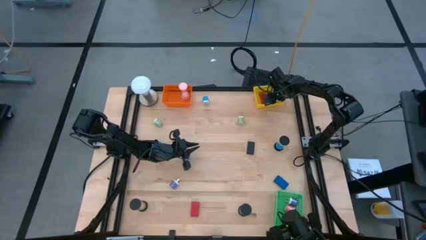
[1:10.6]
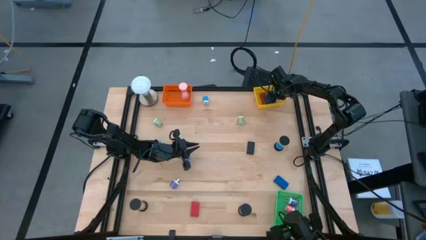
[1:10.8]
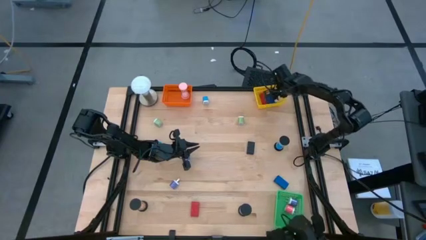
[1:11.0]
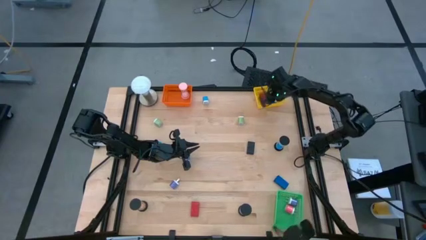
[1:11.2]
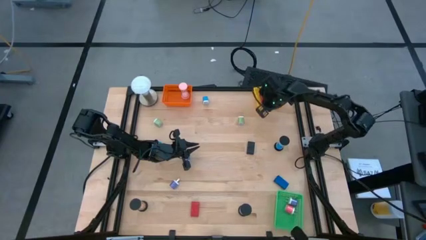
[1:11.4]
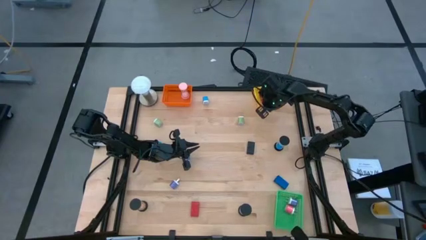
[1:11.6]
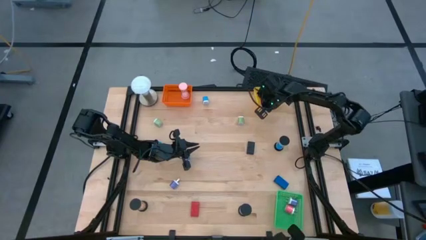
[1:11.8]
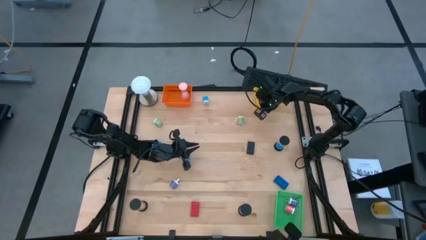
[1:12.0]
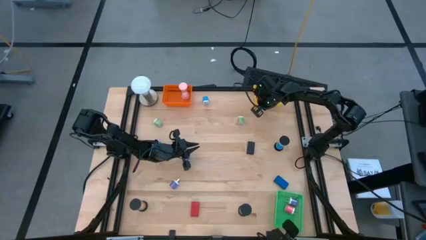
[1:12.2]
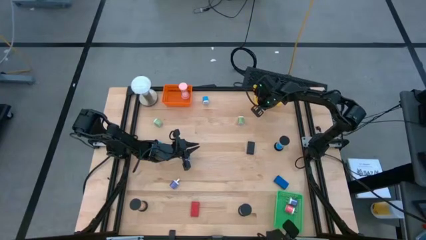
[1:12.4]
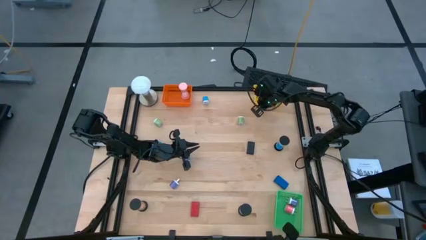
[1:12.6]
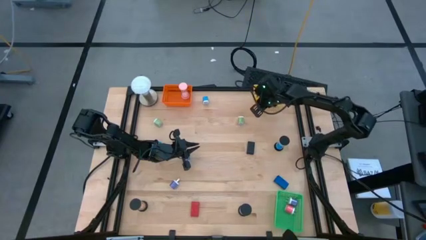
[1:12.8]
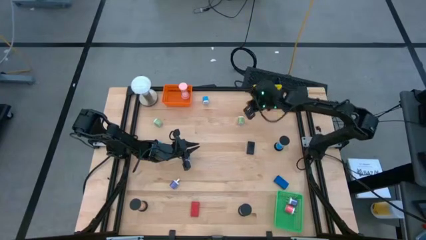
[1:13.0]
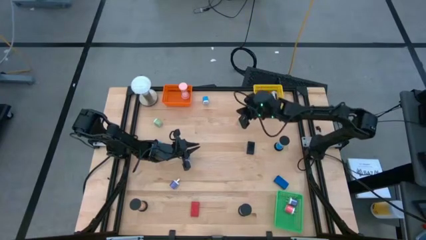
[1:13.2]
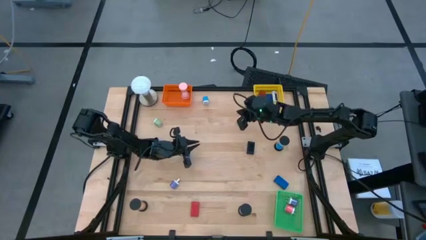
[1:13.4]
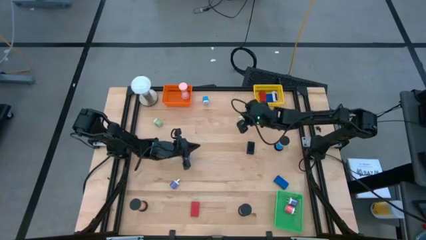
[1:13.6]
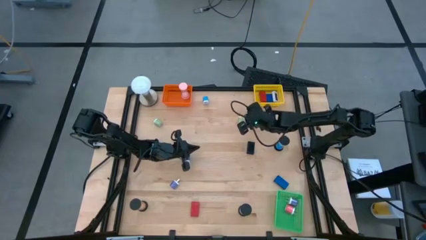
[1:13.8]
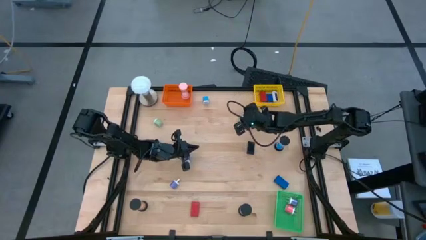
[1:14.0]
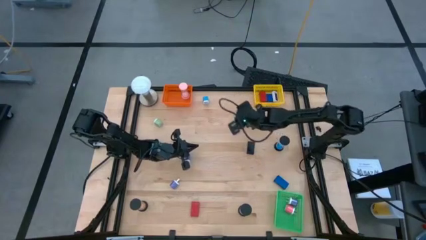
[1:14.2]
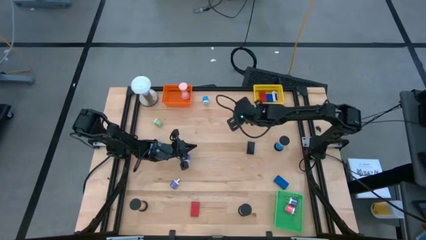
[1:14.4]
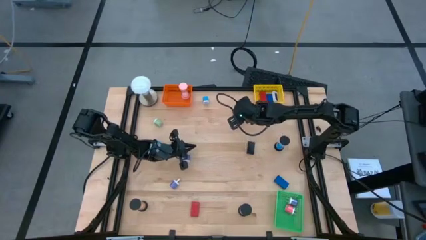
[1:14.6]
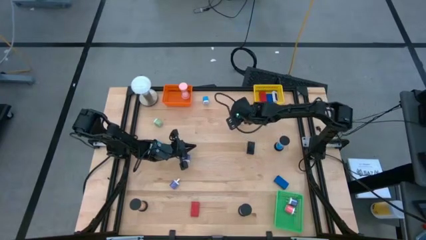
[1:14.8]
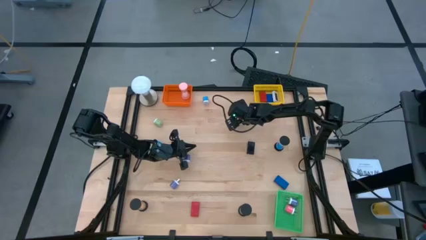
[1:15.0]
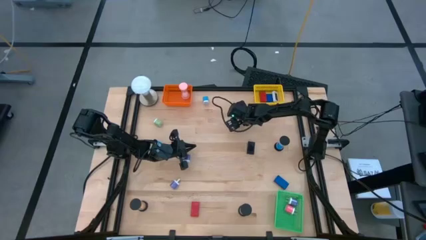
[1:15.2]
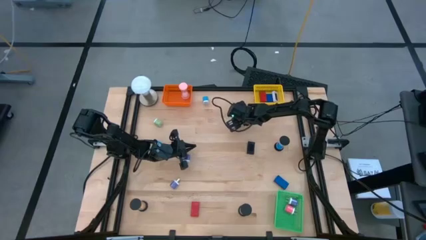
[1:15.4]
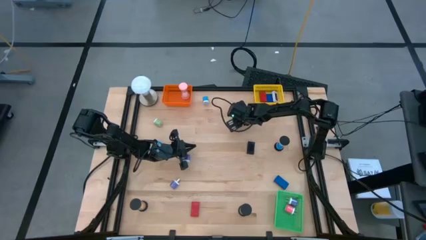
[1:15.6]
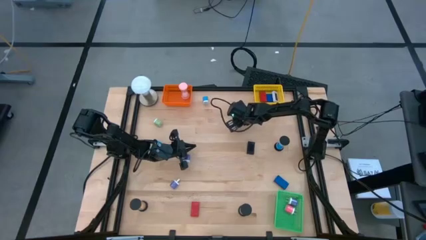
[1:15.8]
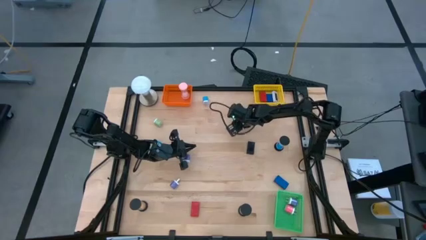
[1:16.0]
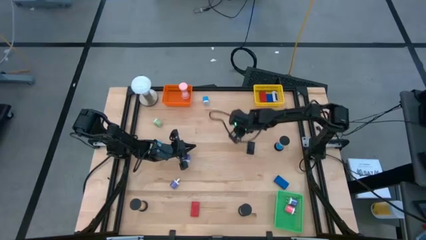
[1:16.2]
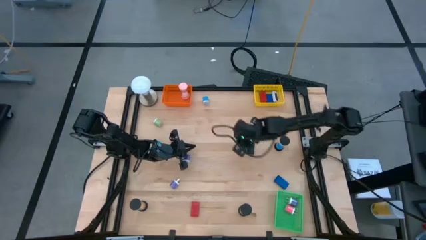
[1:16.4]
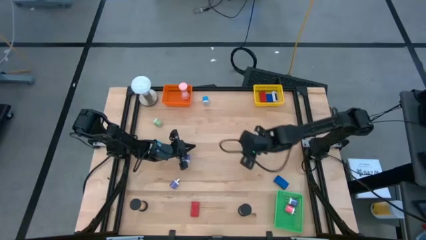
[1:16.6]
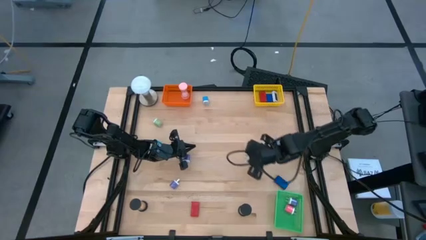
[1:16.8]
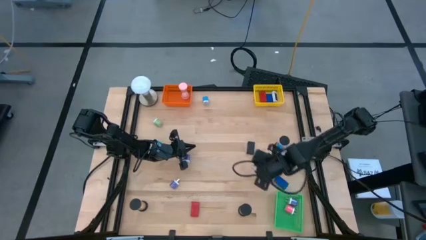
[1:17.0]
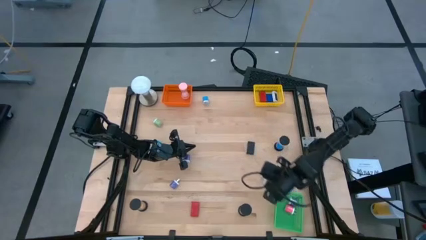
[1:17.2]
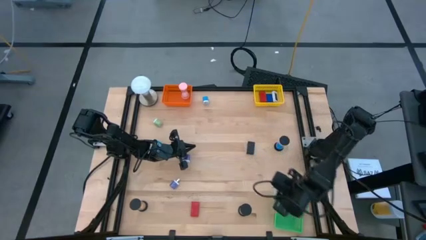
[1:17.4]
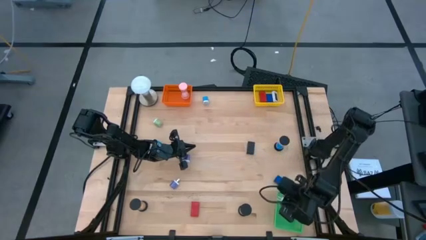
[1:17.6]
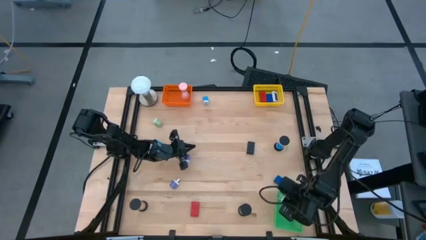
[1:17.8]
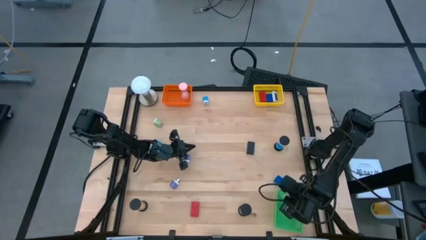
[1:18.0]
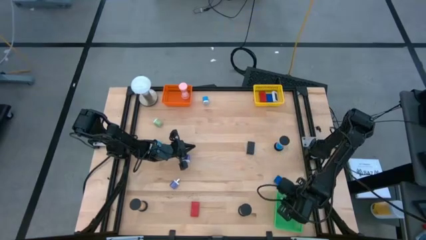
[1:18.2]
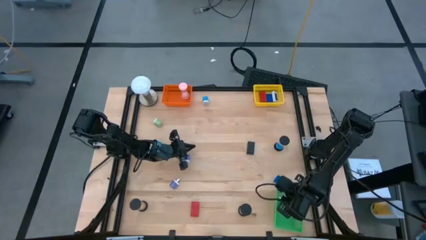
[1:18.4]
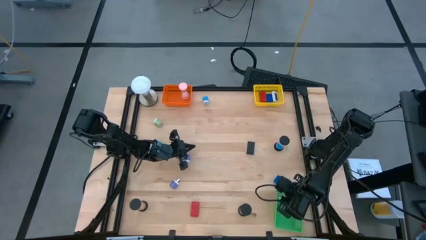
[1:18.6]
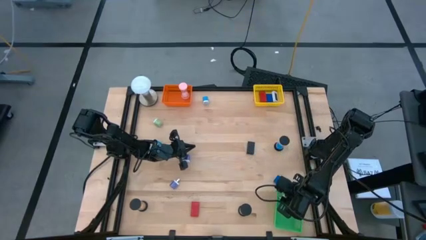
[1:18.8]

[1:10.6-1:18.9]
Task: Pick & Place Office items
Put the right green charger adapter into the green basket

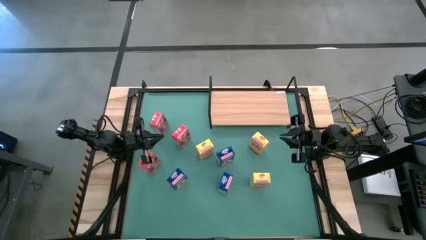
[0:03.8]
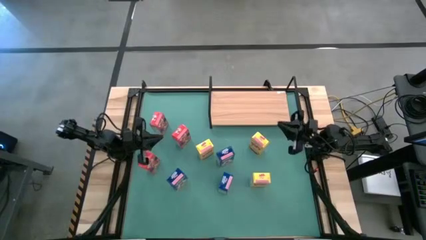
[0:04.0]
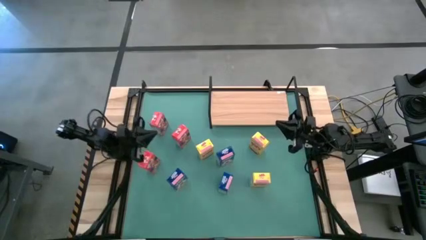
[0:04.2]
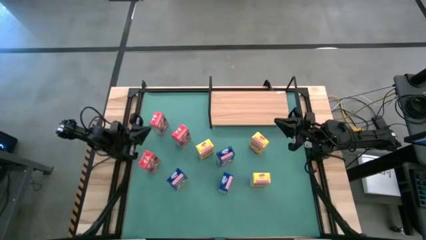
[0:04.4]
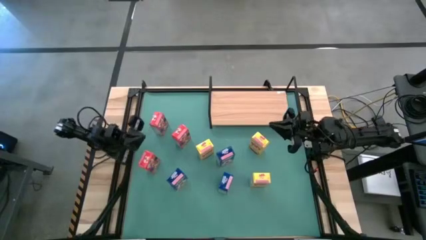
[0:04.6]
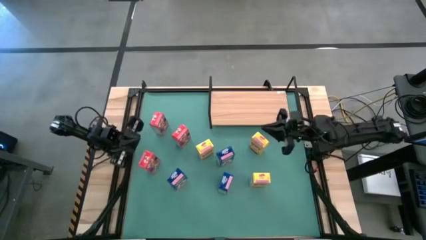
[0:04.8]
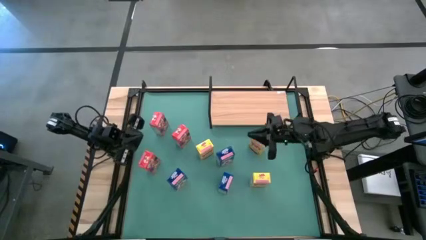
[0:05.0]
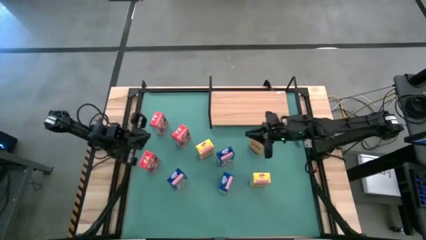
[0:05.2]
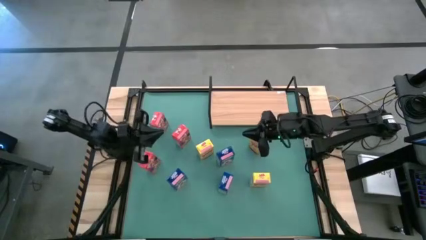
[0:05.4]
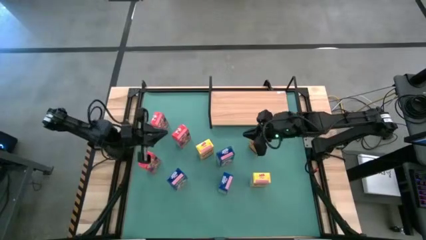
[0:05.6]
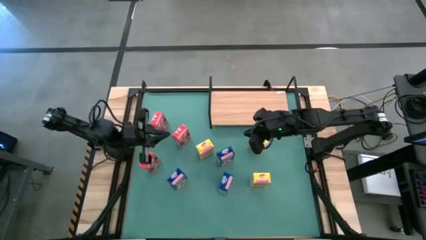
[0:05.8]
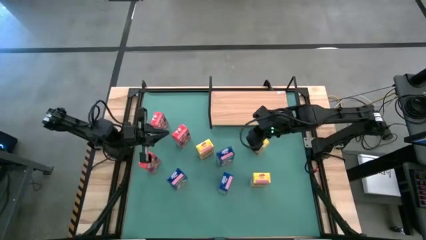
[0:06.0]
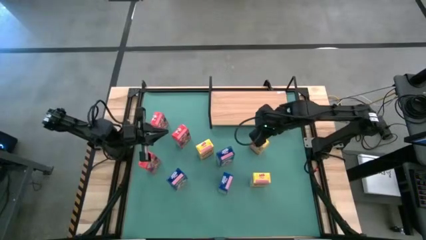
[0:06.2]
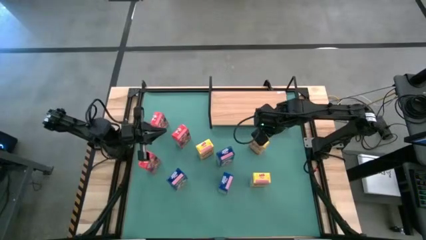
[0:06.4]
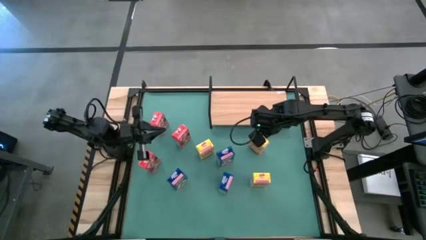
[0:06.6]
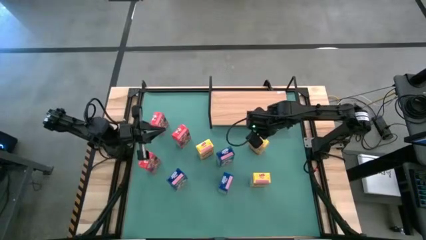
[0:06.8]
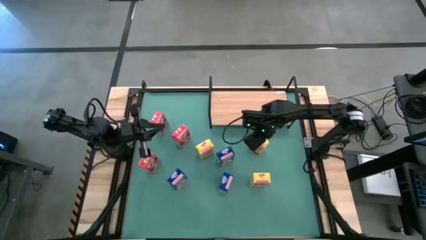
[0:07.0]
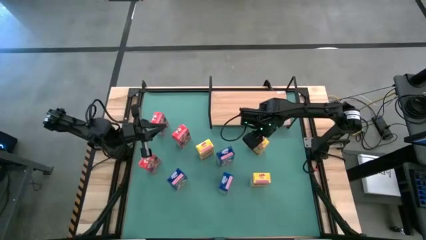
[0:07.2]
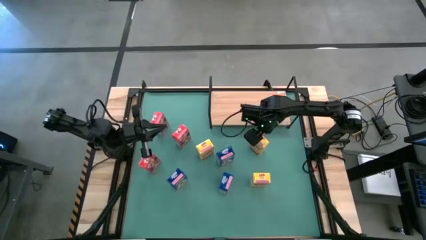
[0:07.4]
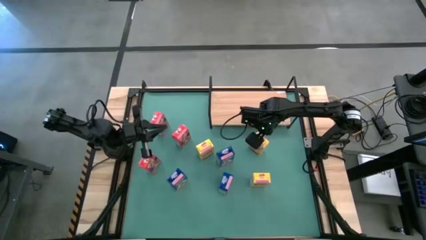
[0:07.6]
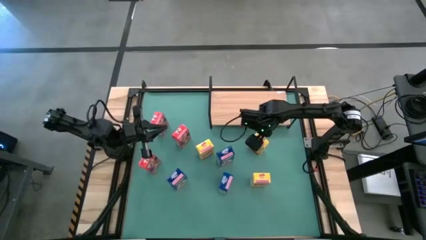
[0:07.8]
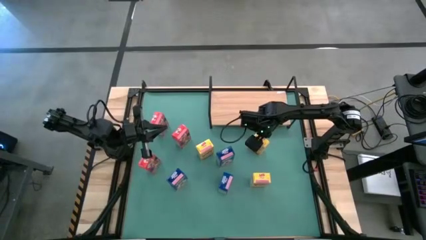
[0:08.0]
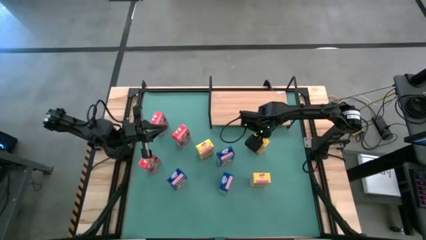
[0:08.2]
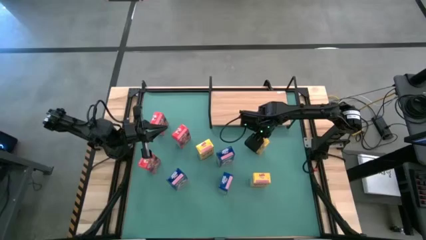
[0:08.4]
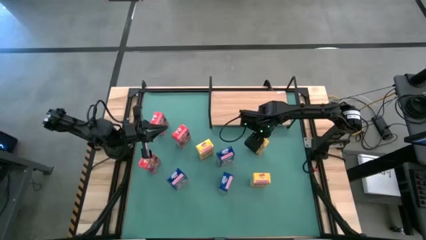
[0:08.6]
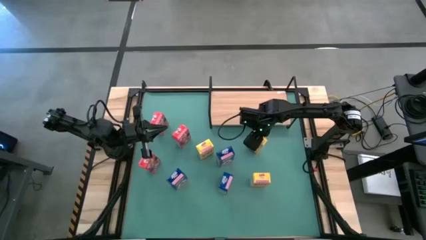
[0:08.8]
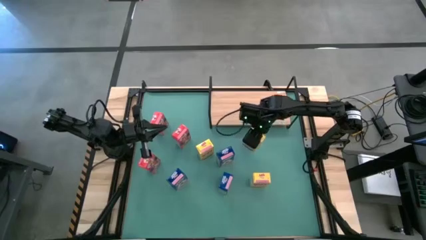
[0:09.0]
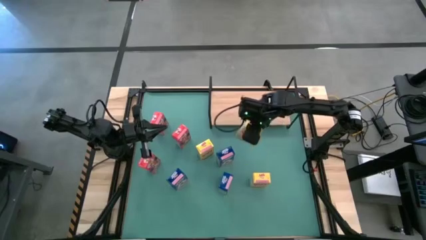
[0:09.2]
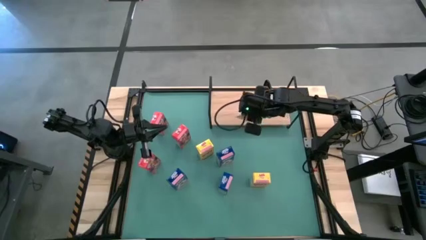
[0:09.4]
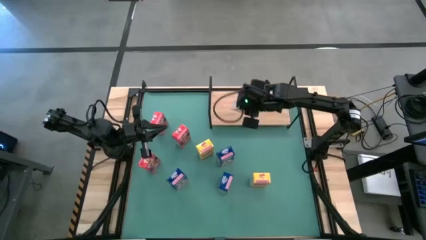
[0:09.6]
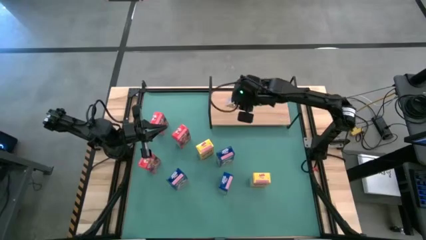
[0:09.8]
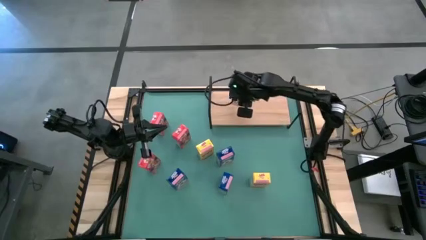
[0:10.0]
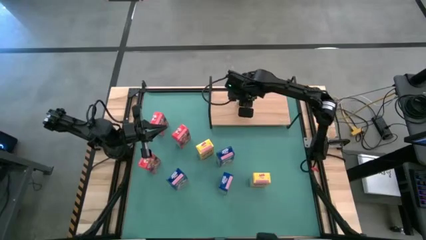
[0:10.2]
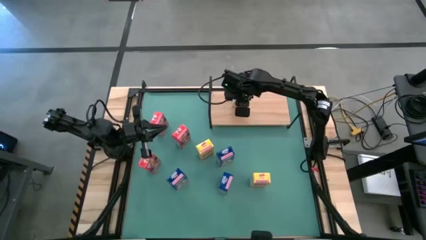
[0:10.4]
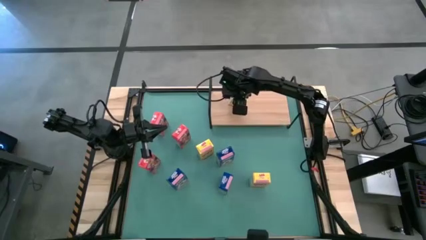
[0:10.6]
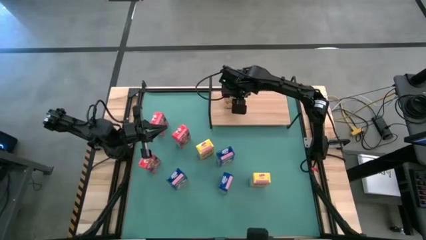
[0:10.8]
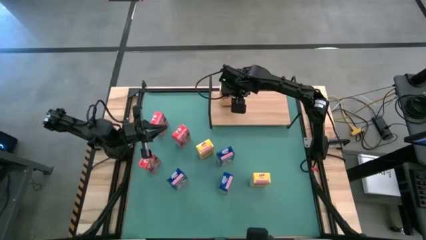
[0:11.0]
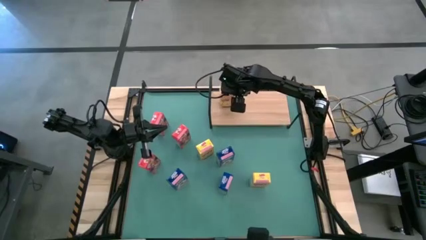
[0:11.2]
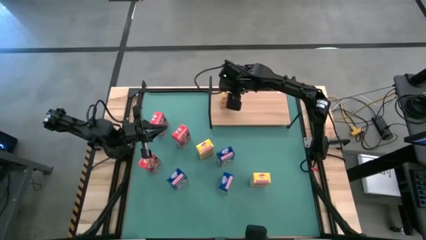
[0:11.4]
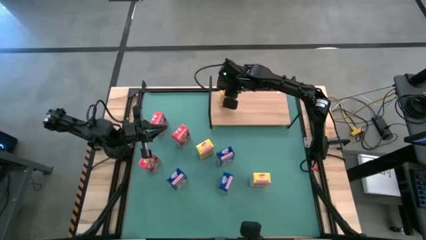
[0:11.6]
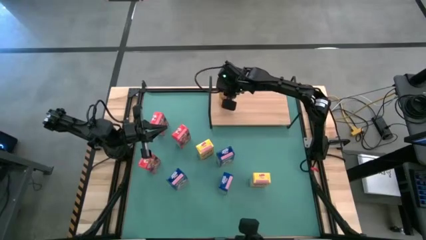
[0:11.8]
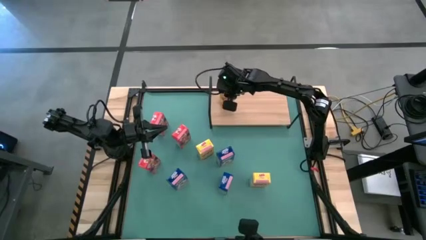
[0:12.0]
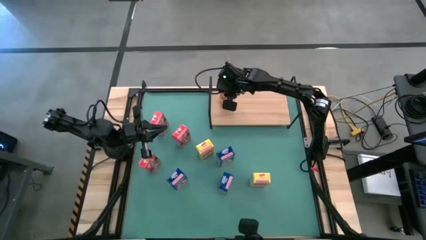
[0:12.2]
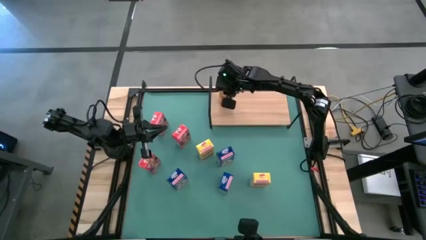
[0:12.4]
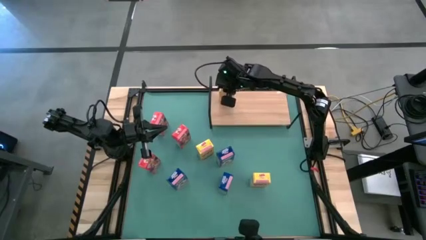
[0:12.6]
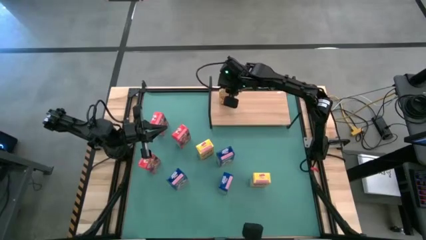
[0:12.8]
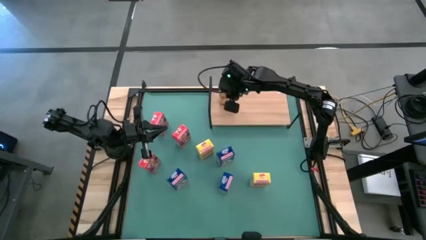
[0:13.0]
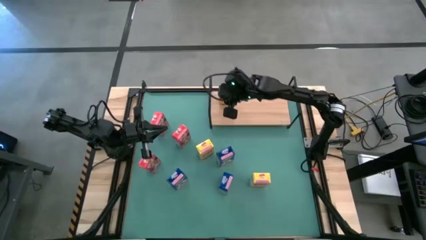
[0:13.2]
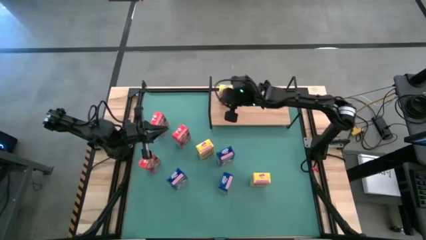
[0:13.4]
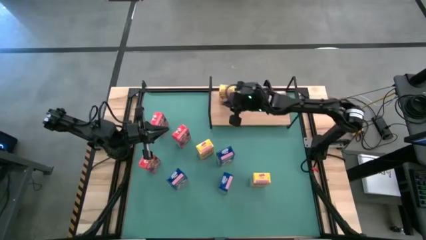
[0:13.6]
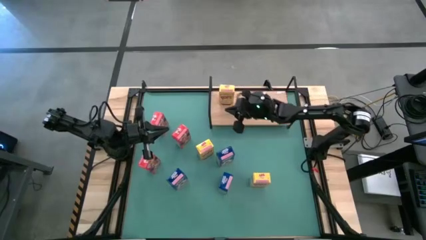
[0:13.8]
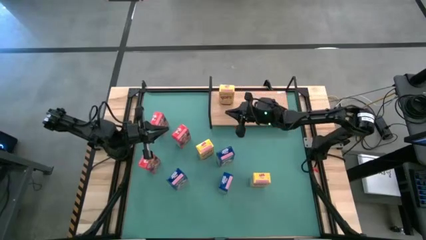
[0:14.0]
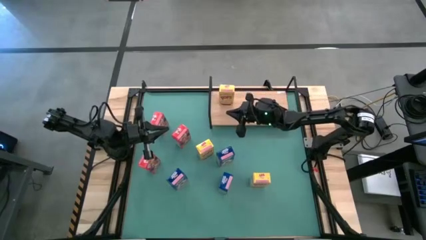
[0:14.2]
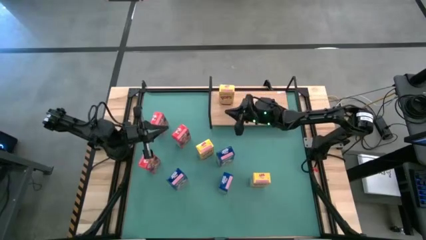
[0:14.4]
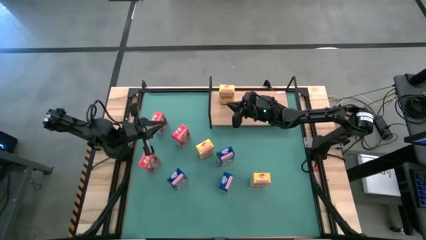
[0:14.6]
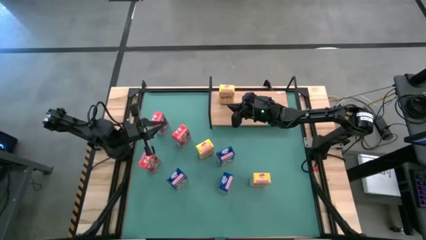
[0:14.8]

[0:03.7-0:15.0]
Task: Stack cereal on shelf
Put the top right yellow cereal box on the shelf
